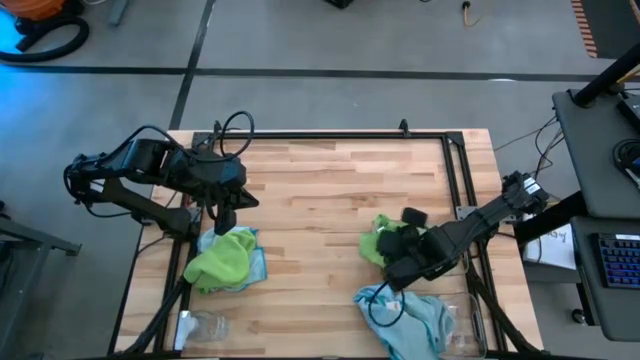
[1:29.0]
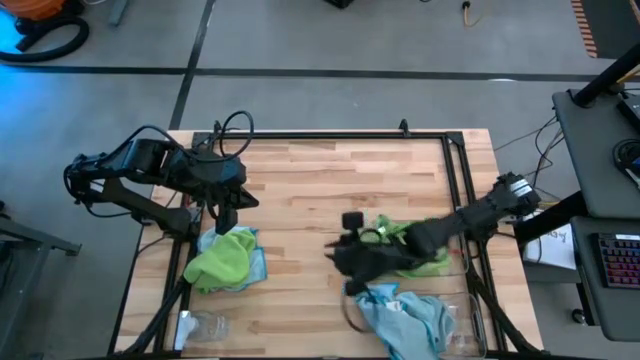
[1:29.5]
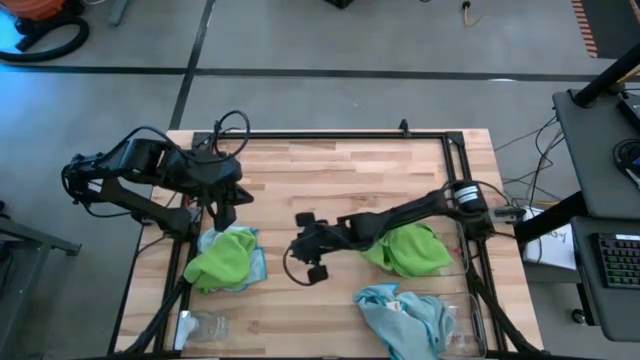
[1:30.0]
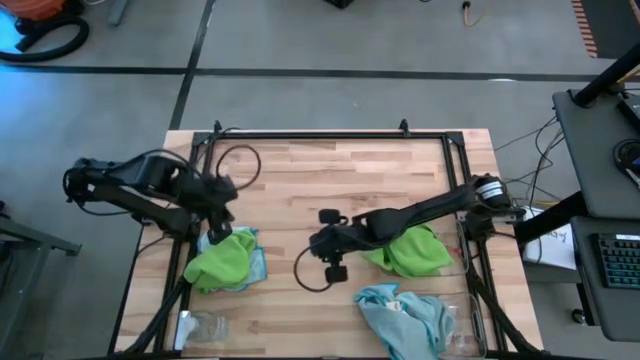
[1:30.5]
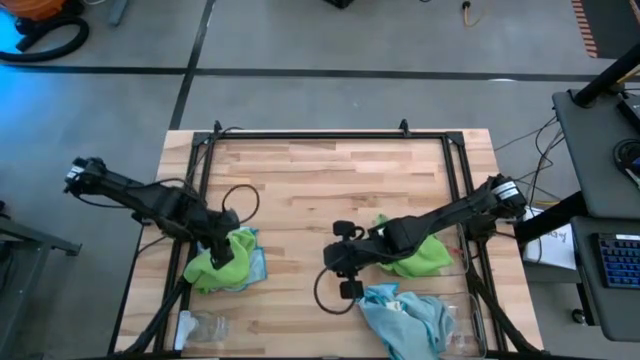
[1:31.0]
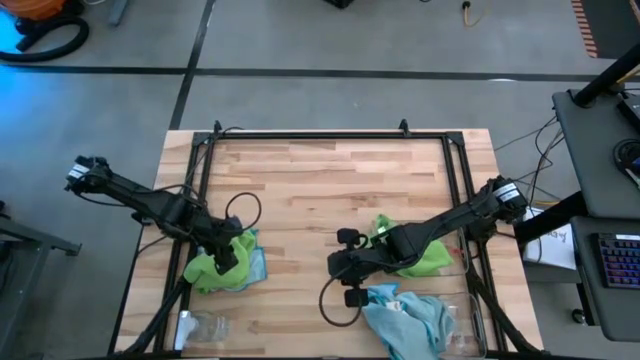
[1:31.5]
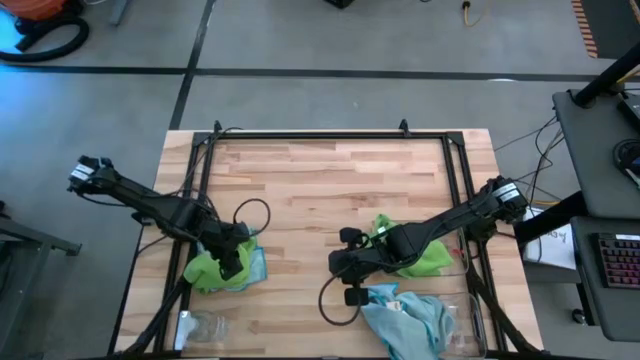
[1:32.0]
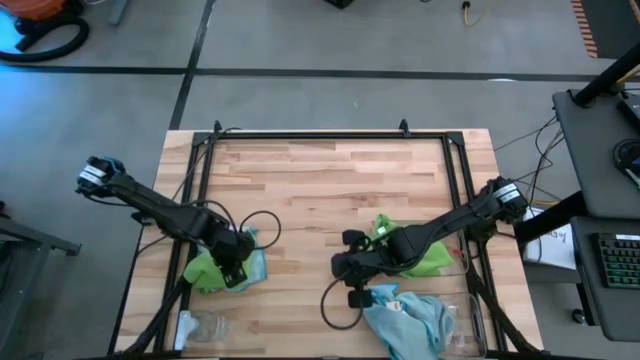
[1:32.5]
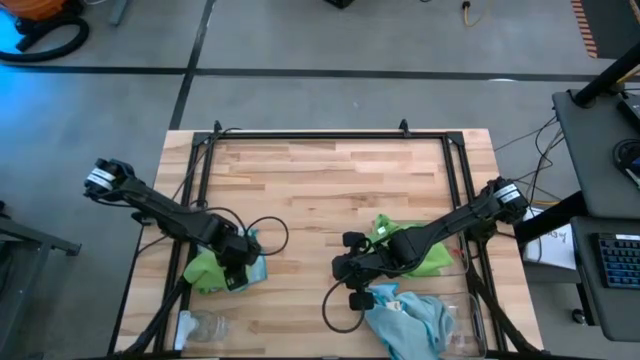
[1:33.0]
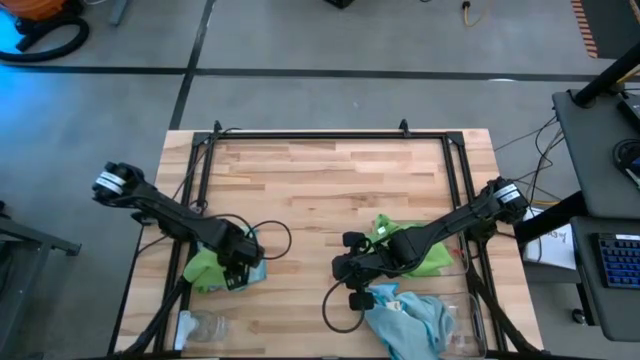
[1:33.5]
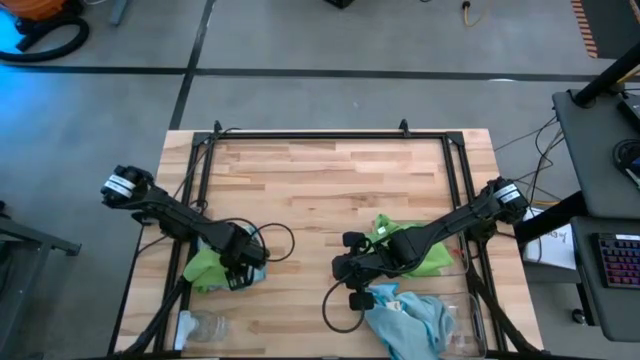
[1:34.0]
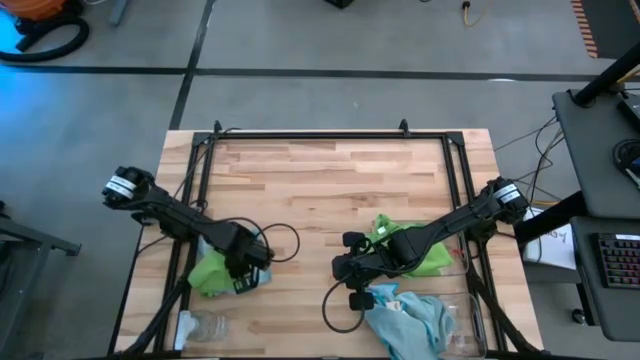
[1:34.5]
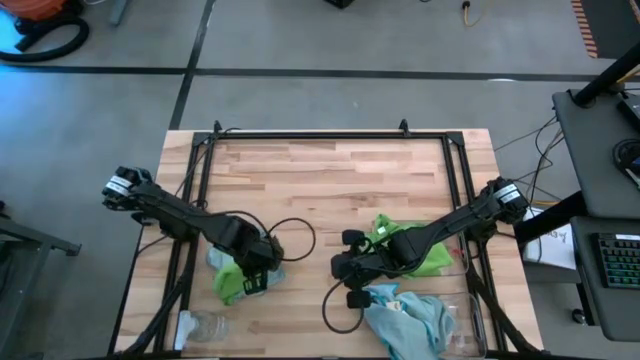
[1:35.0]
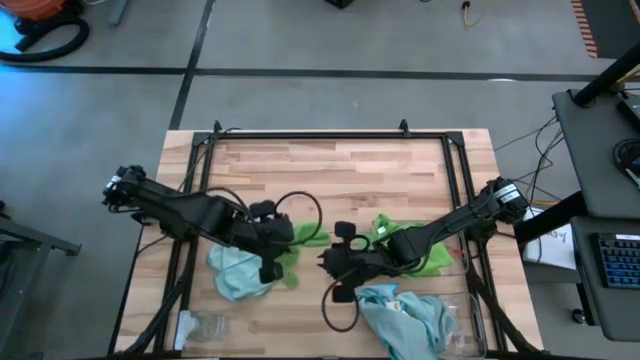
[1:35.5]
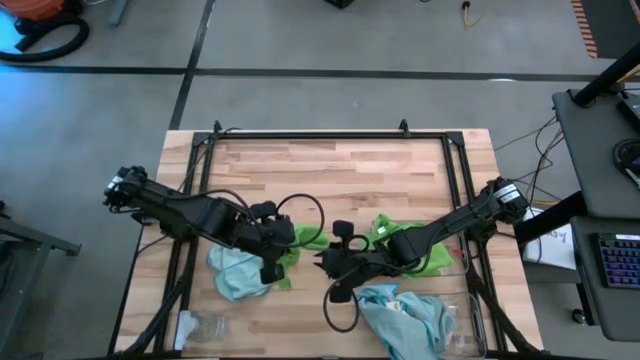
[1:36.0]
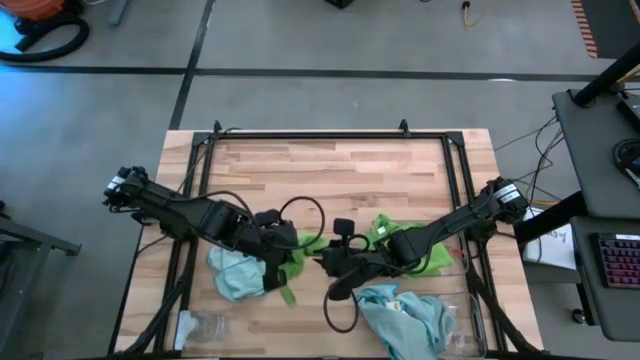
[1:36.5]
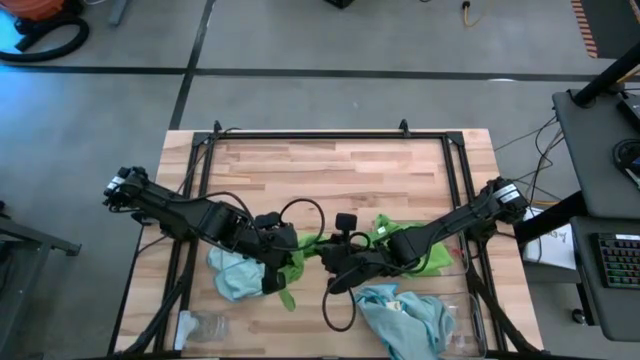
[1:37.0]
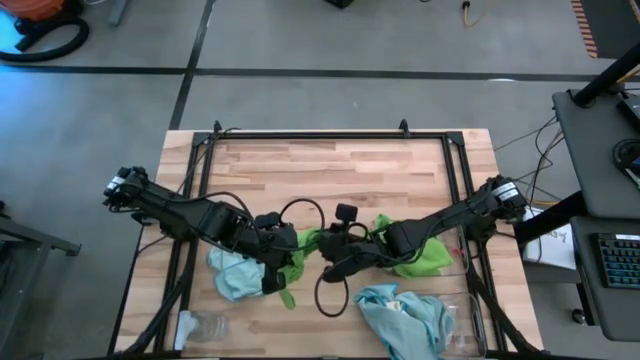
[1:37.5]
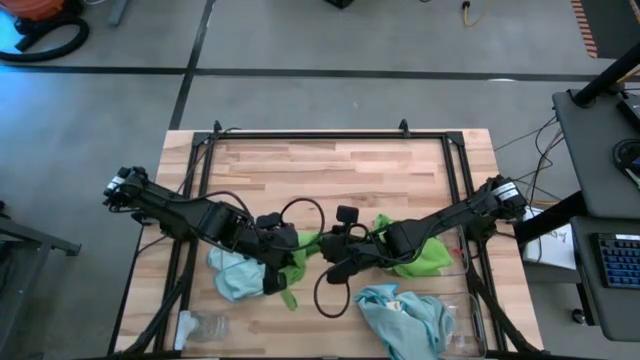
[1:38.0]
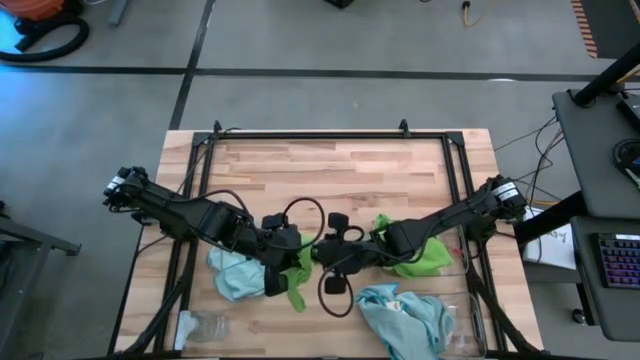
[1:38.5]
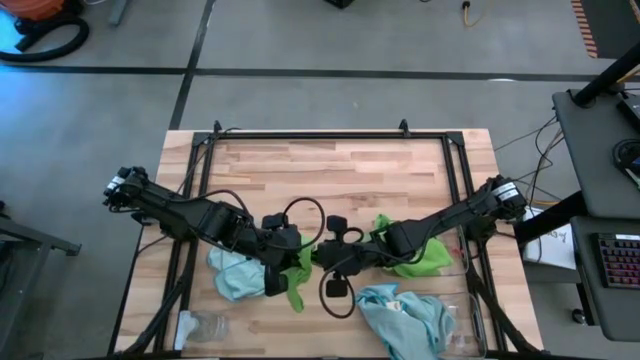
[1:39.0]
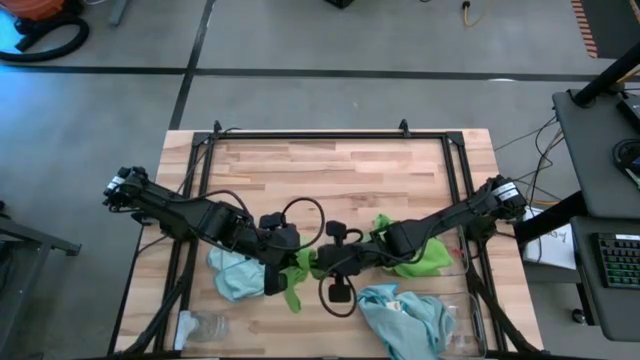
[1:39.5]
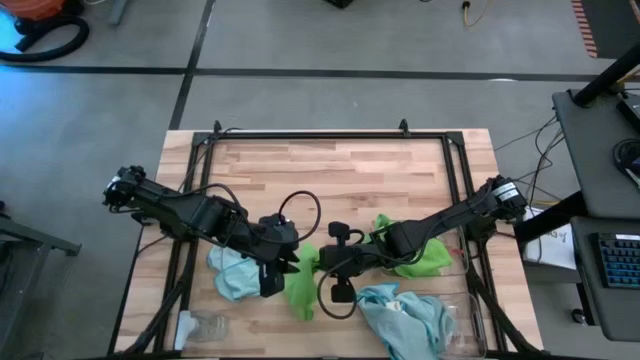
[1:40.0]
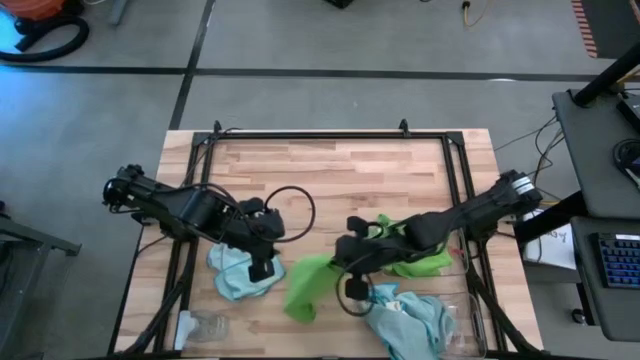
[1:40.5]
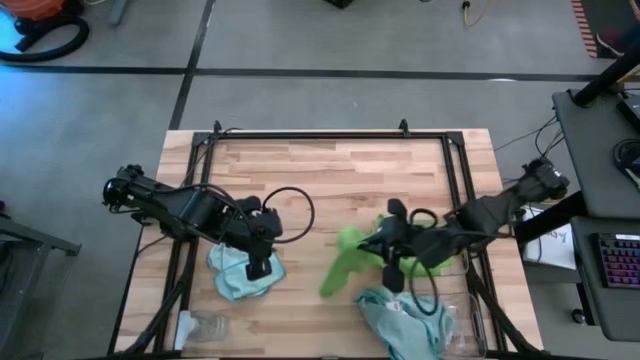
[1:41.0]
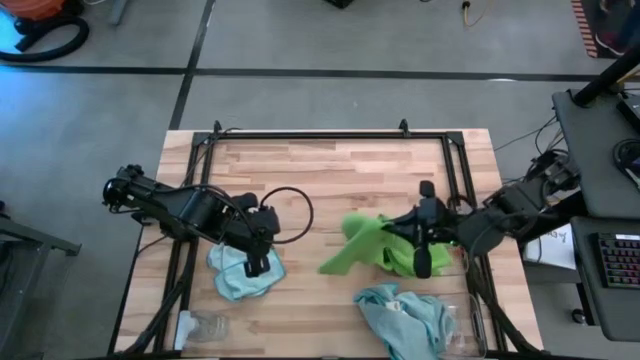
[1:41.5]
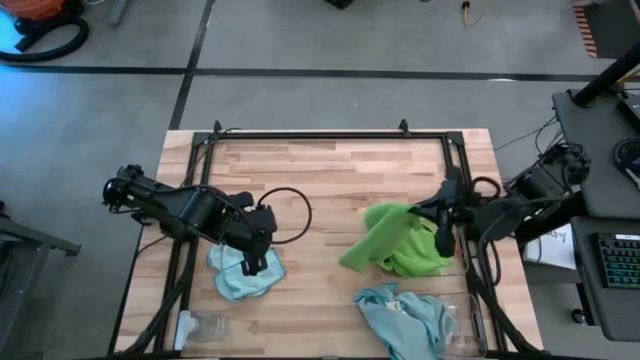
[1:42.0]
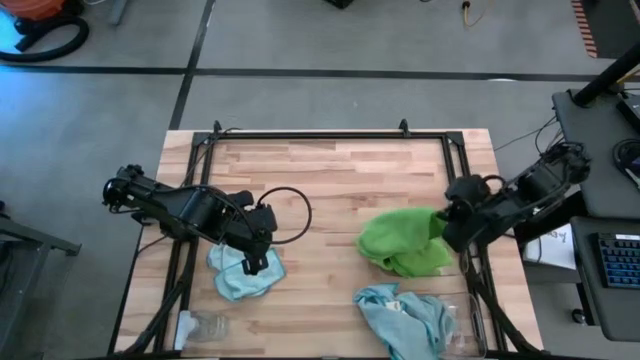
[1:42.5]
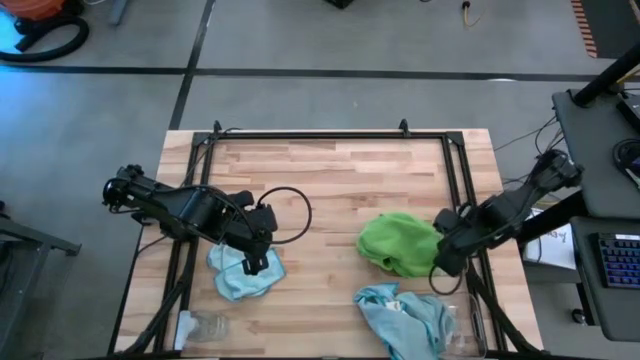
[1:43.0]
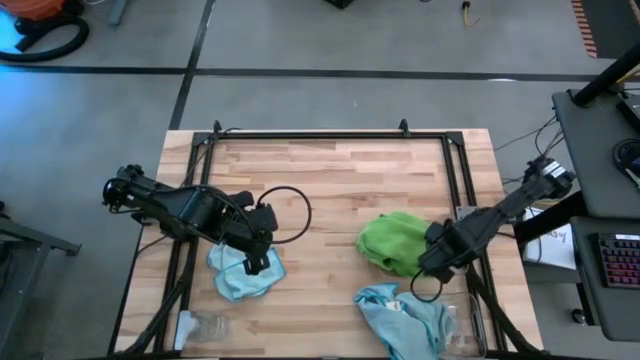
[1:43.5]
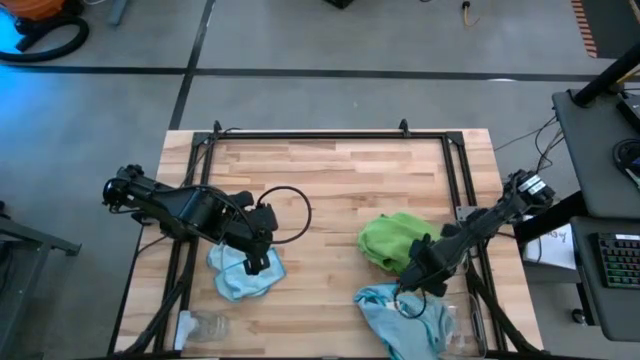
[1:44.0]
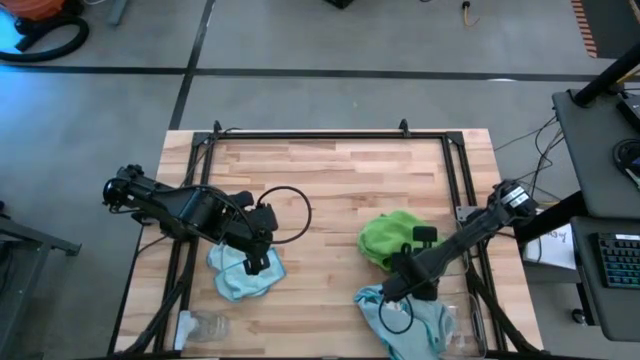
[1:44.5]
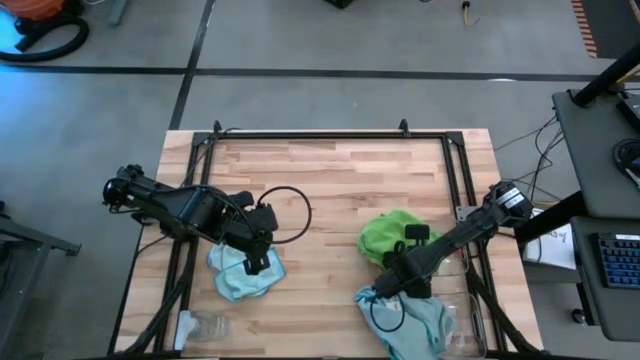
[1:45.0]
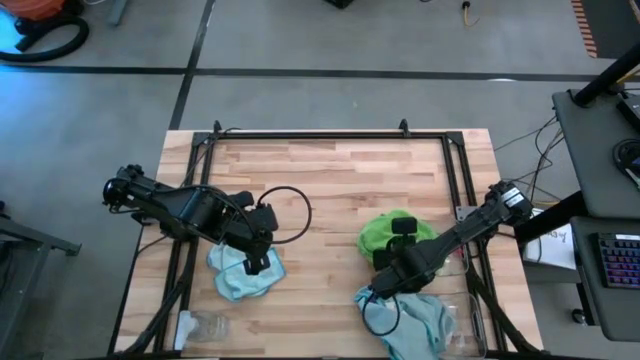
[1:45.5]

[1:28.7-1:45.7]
Task: Sort microfiber towel by color & place in baskets
Put the green microfiber cloth into the top transparent bin
